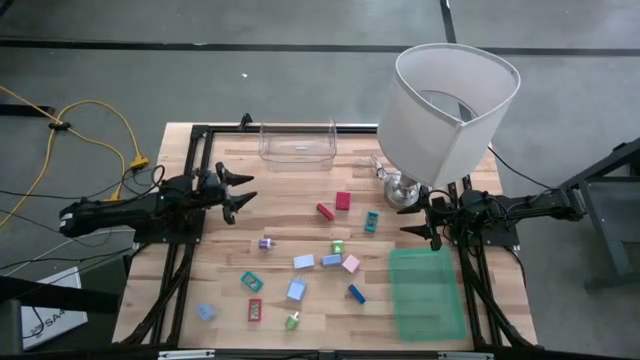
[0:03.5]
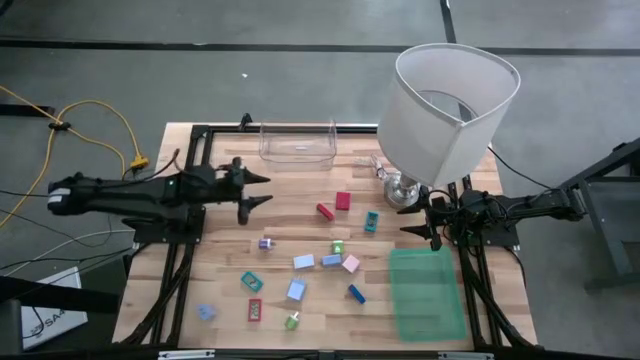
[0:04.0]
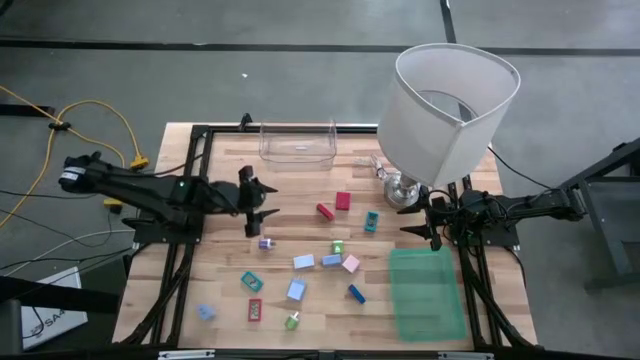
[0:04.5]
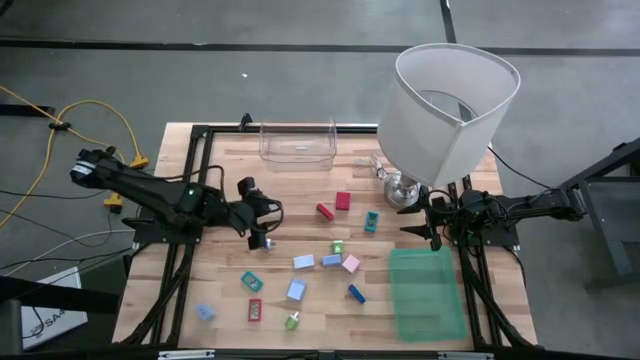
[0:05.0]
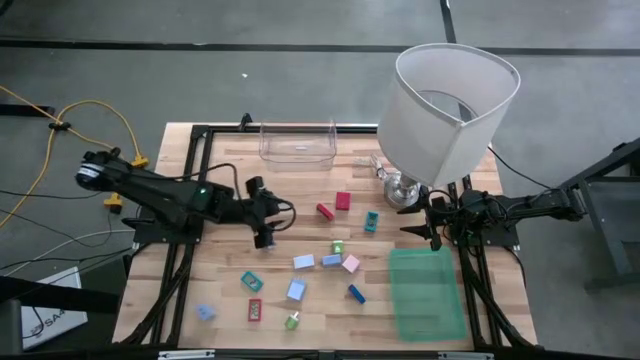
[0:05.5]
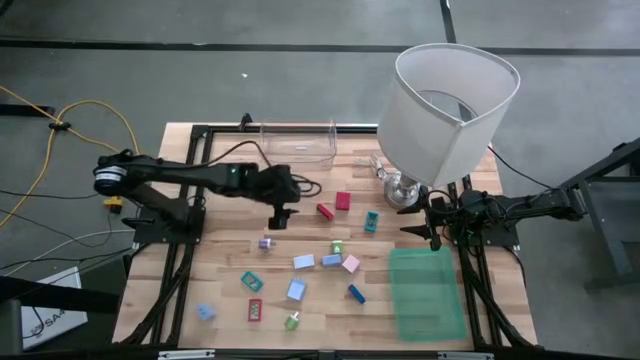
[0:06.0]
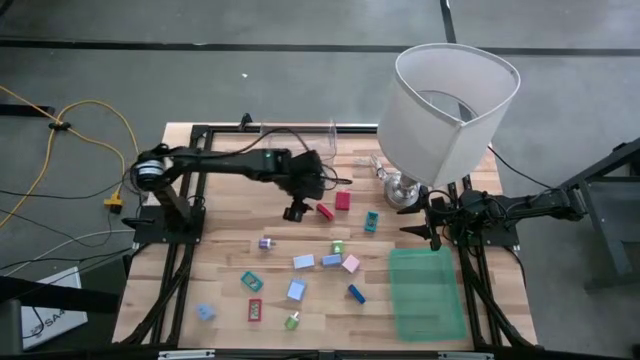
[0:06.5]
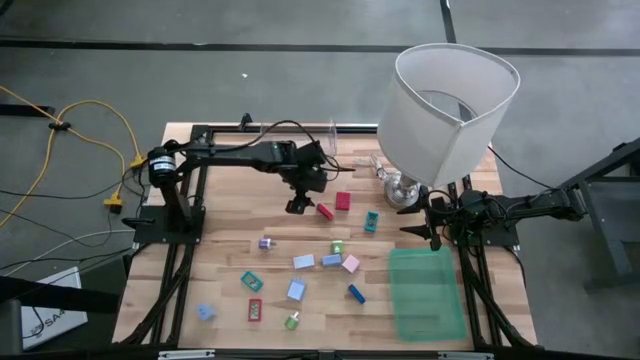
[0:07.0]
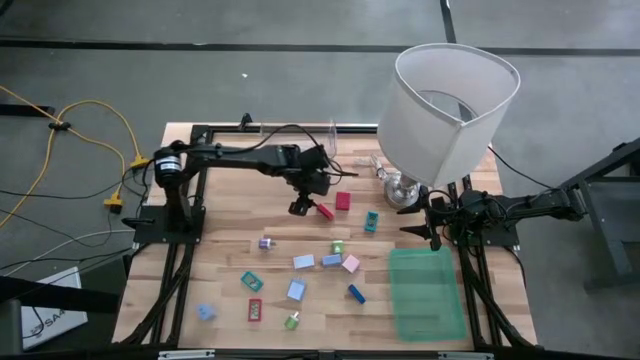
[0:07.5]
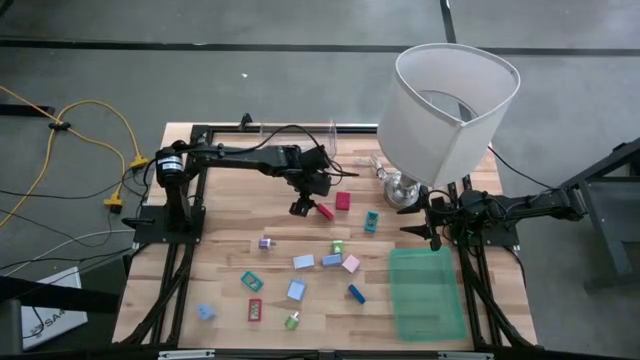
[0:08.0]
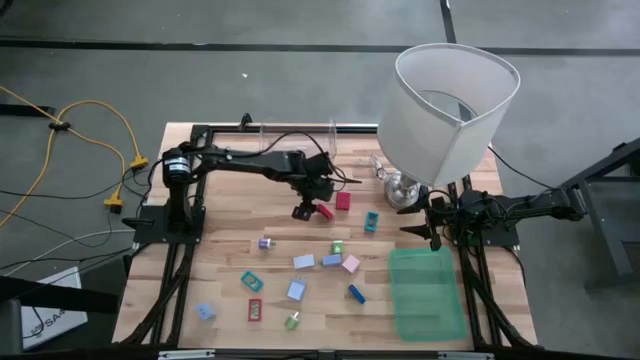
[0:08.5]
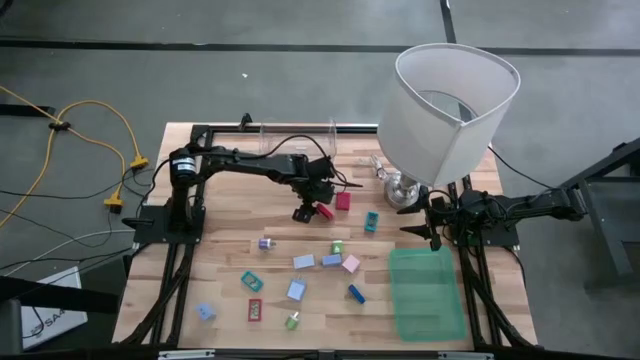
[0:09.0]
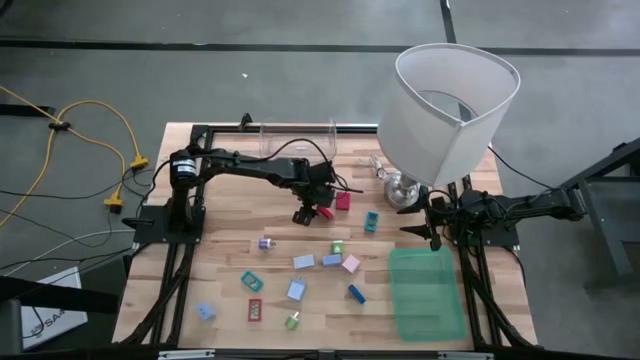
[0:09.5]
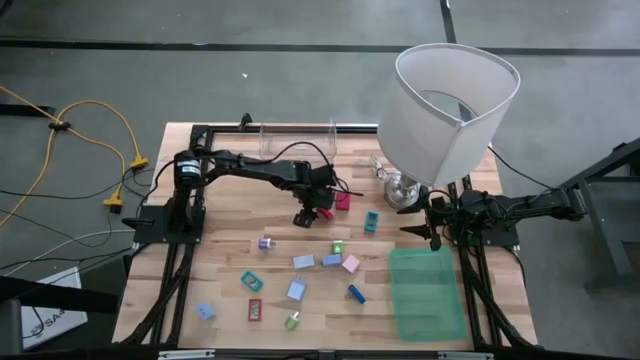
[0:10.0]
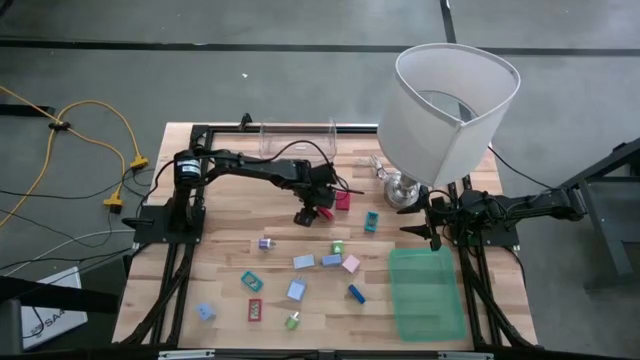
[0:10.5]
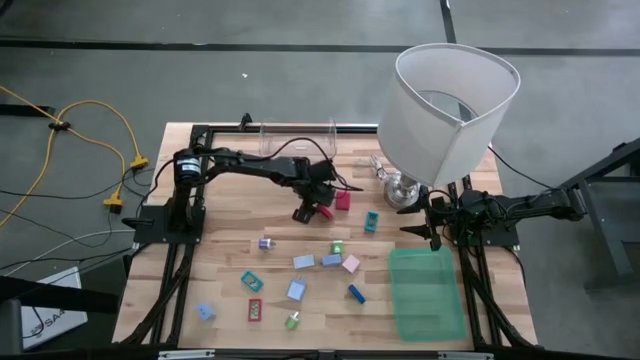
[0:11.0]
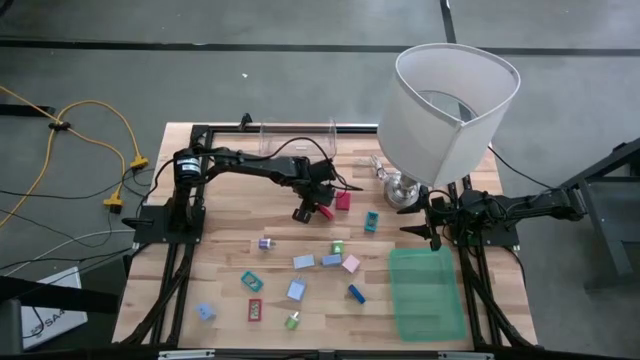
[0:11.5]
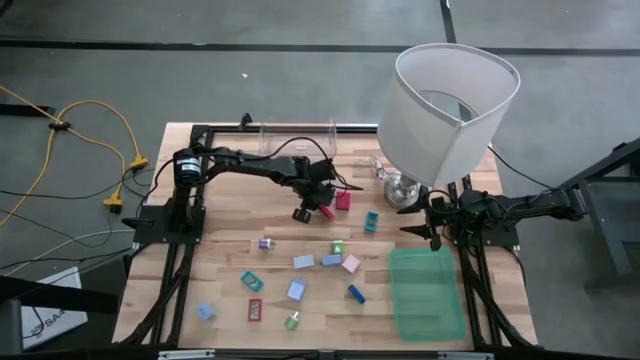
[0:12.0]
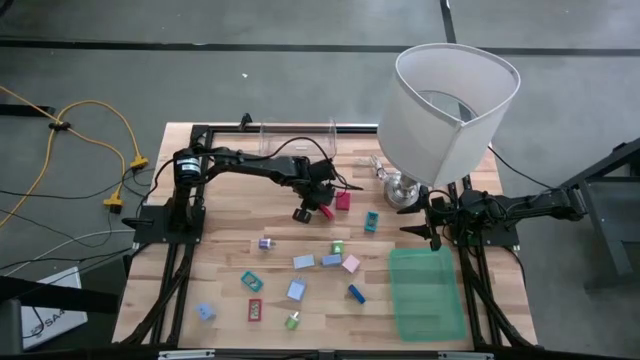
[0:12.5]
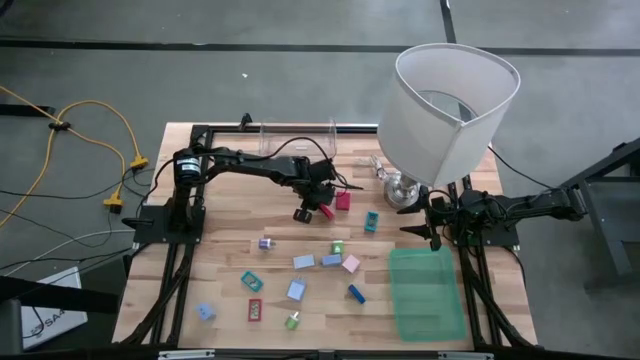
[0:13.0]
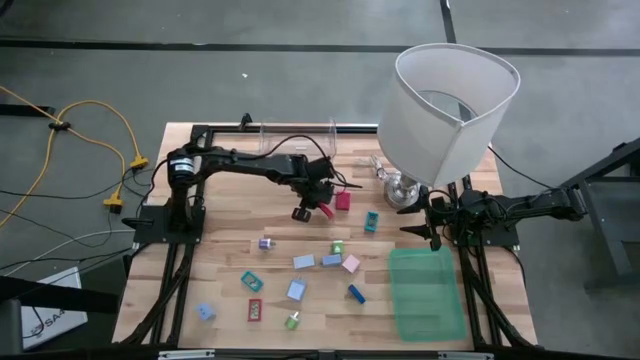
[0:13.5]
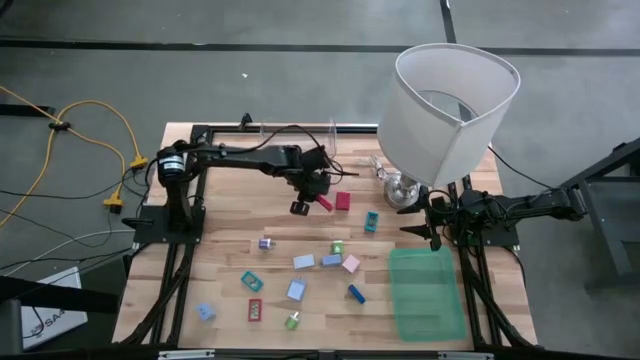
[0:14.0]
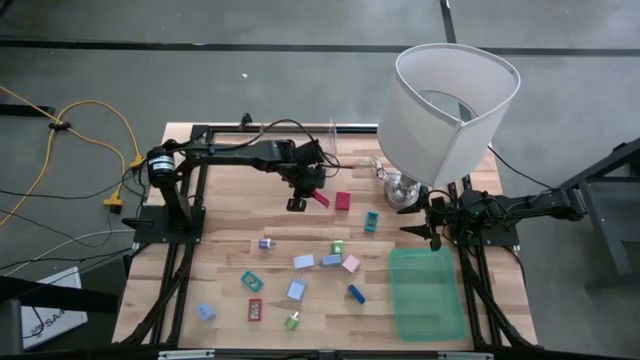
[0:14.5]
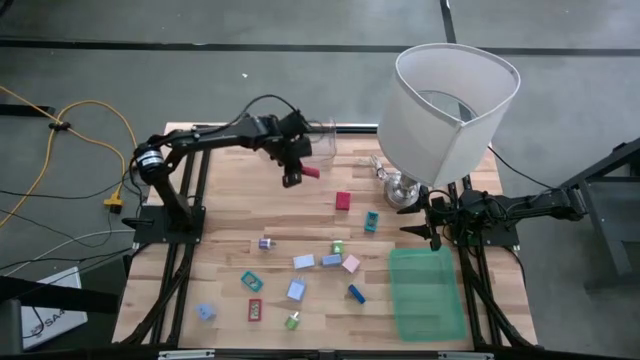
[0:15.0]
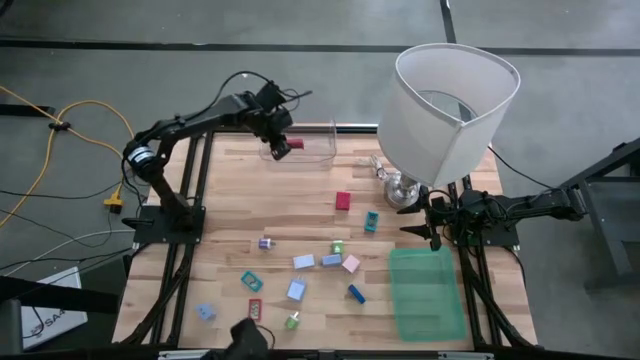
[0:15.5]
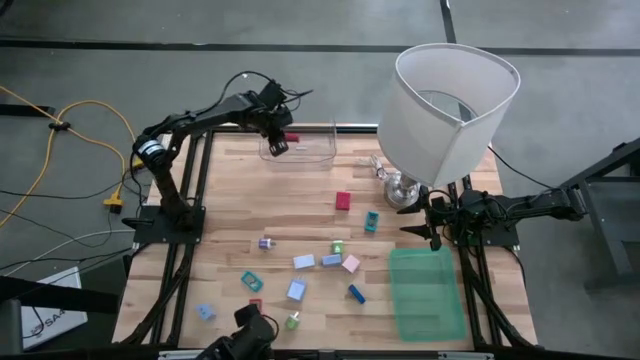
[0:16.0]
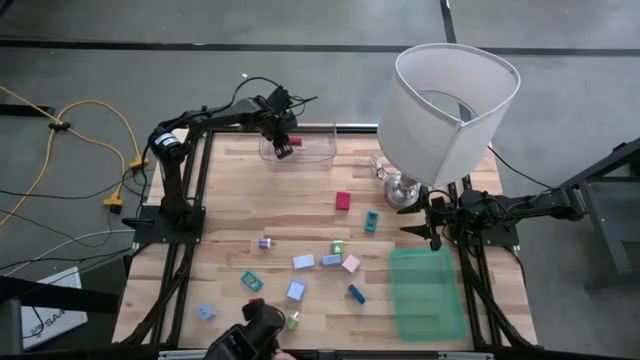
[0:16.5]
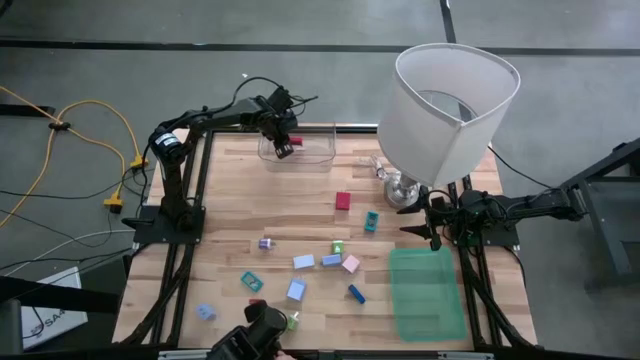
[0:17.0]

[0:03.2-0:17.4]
Task: Pick & Place Office items
Put the top red digital clock into the transparent bin

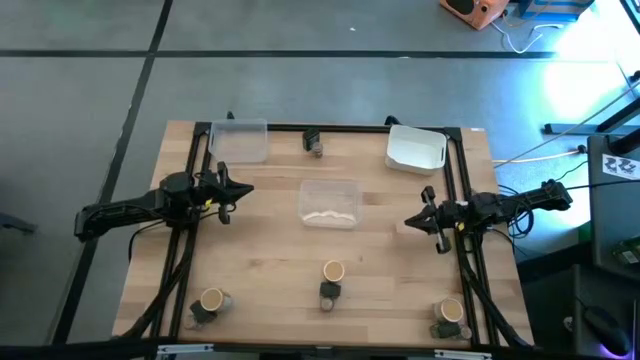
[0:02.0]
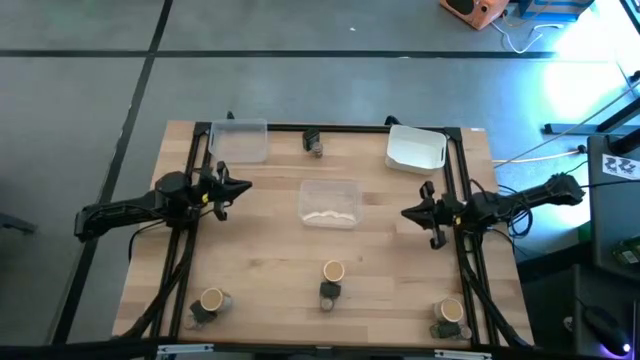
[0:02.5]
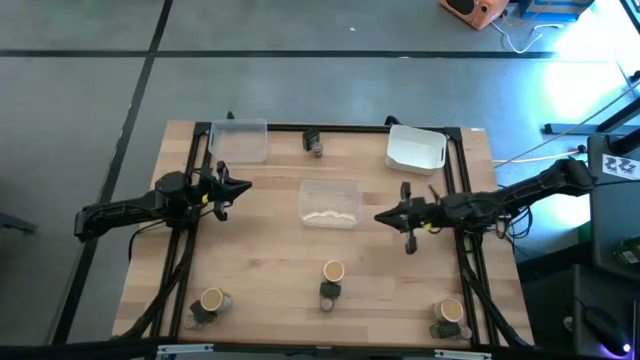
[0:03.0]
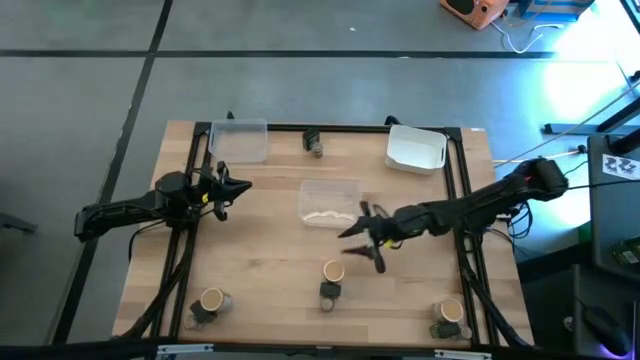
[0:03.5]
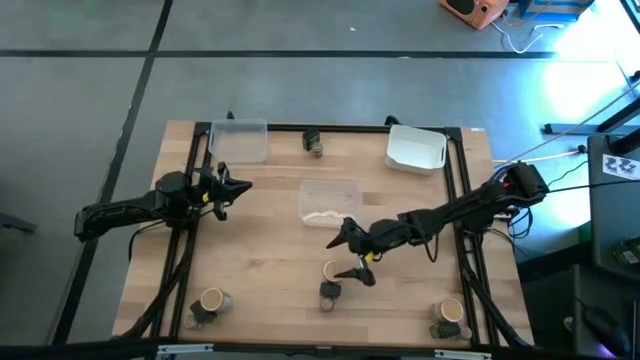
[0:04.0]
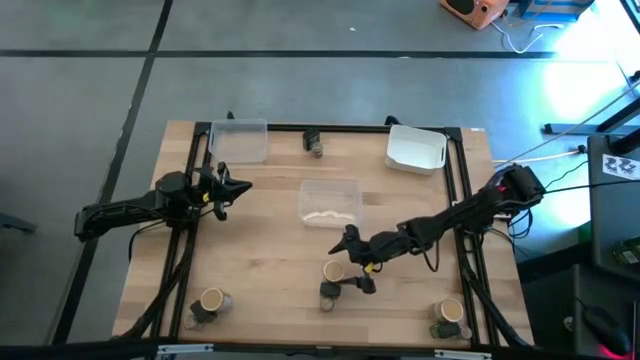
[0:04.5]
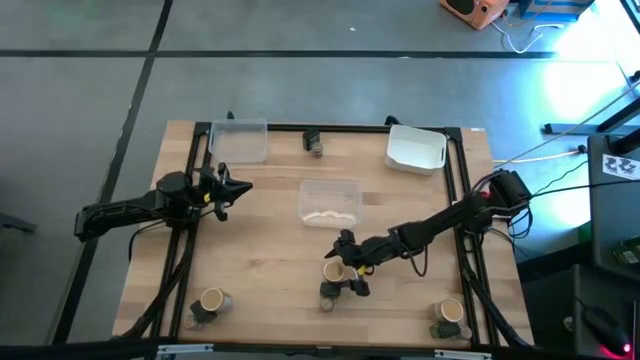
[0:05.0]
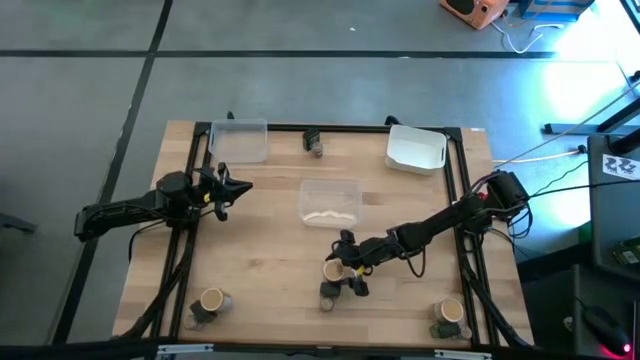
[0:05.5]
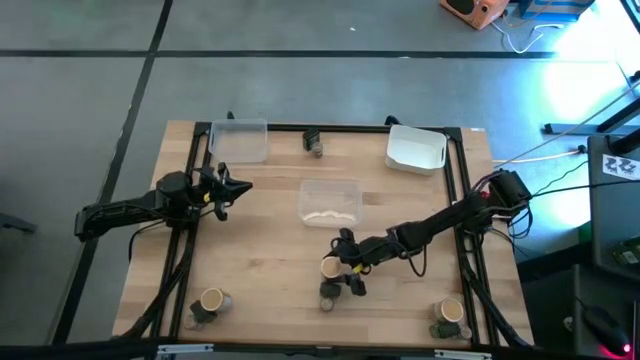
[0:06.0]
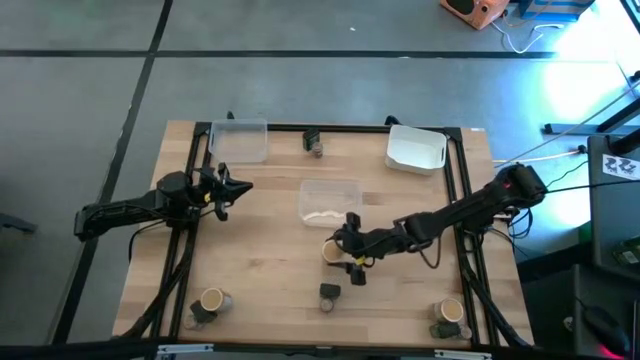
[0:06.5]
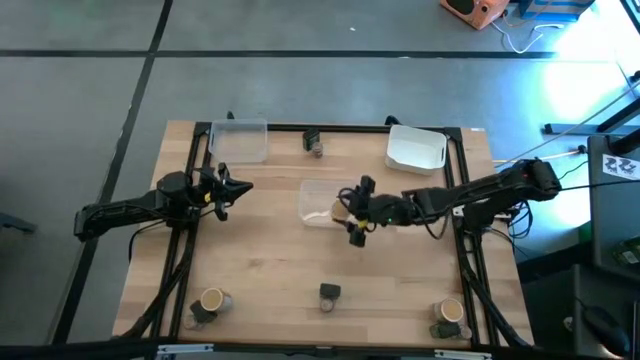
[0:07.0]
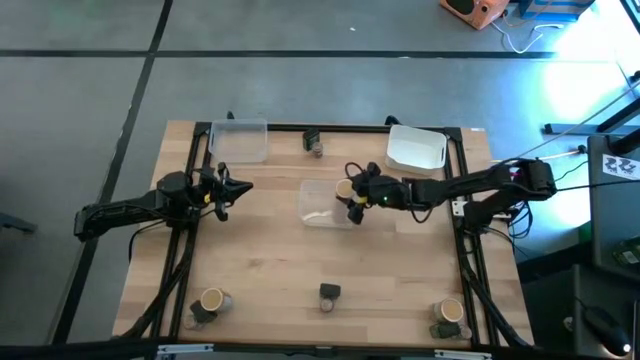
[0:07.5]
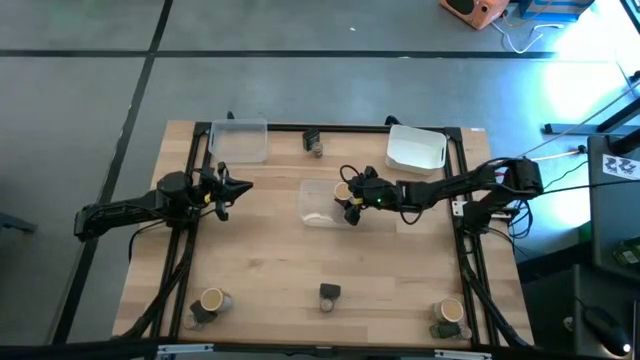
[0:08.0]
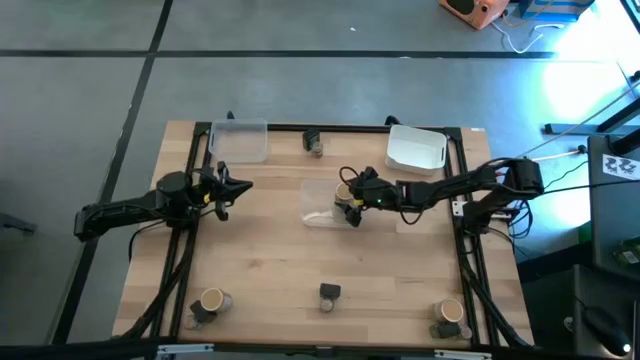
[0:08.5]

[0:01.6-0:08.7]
Task: Sort spices by type
Put the gold seasoning bottle into the bottom transparent bin
